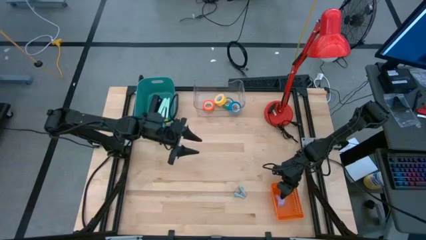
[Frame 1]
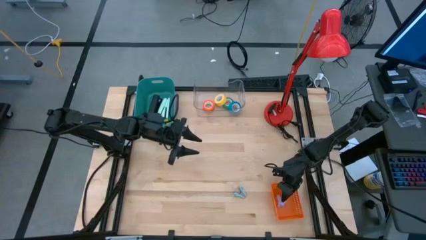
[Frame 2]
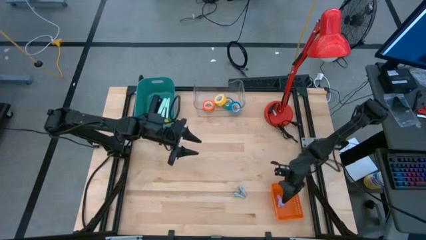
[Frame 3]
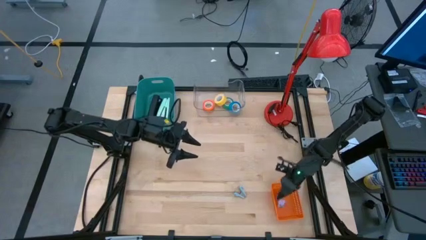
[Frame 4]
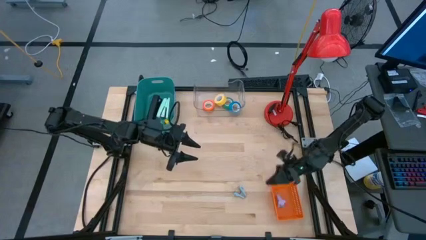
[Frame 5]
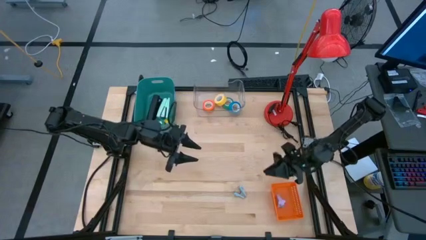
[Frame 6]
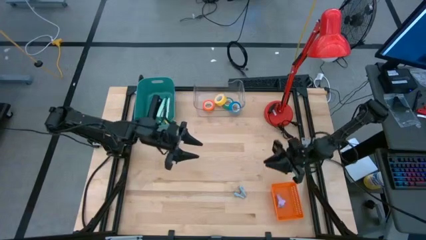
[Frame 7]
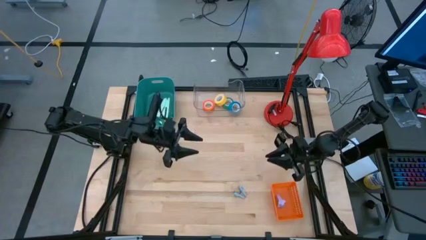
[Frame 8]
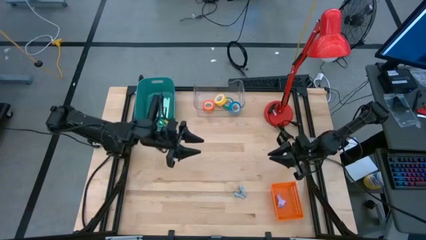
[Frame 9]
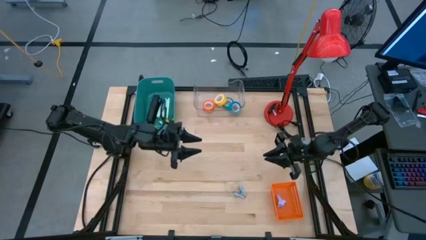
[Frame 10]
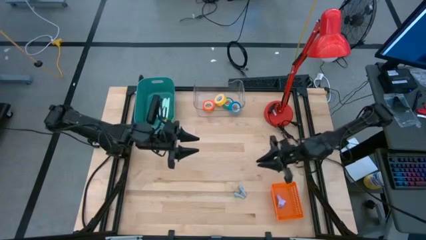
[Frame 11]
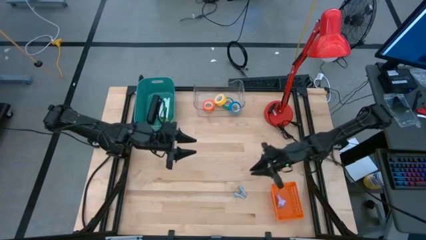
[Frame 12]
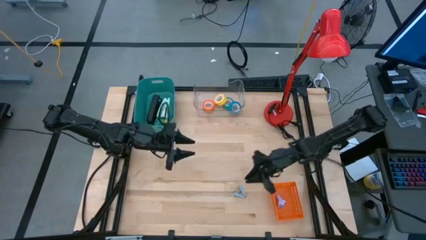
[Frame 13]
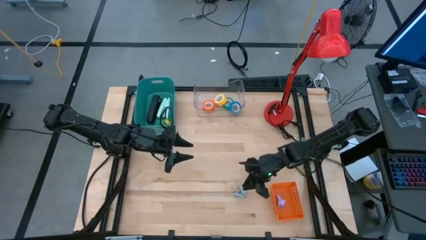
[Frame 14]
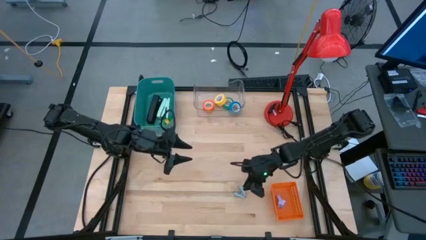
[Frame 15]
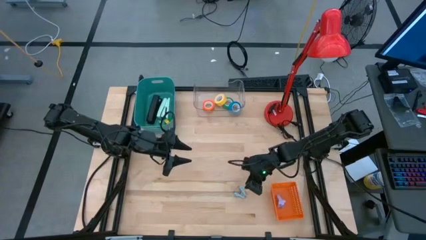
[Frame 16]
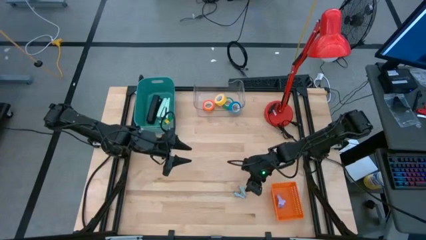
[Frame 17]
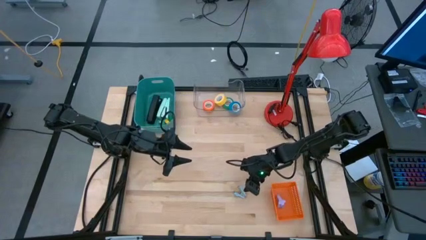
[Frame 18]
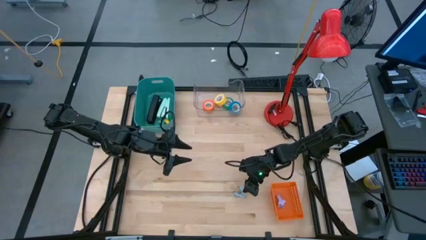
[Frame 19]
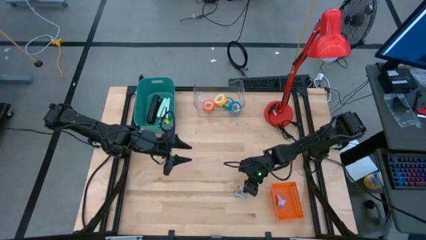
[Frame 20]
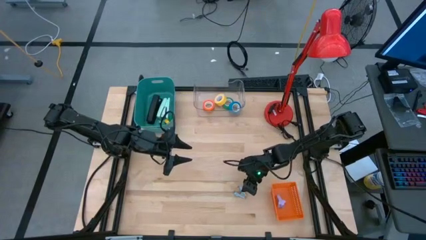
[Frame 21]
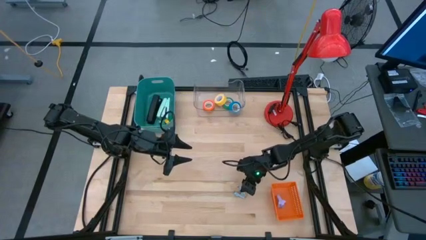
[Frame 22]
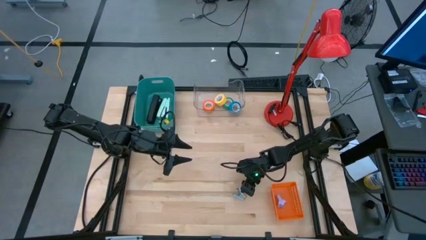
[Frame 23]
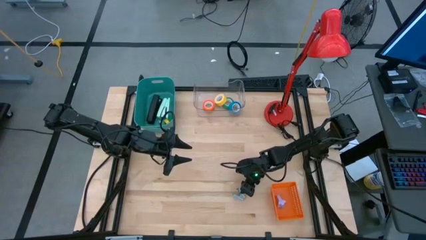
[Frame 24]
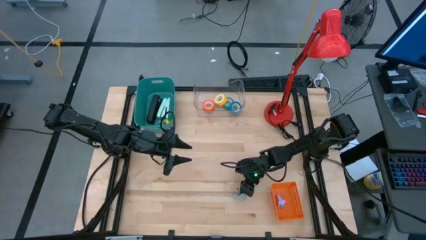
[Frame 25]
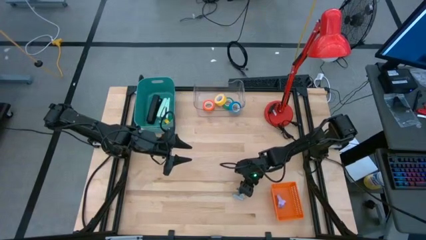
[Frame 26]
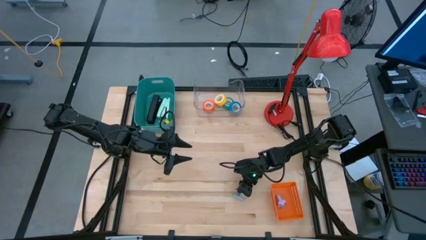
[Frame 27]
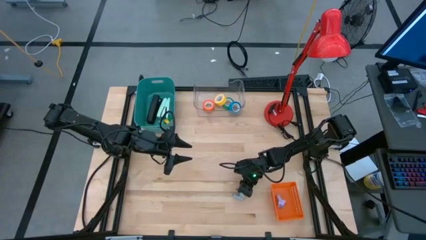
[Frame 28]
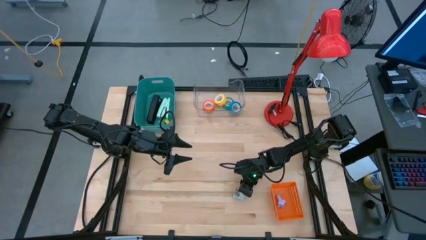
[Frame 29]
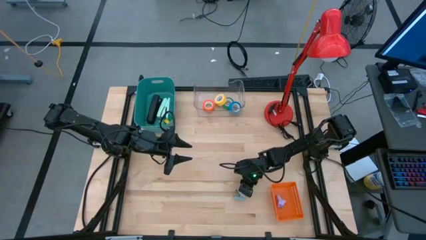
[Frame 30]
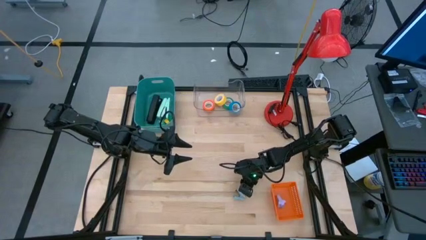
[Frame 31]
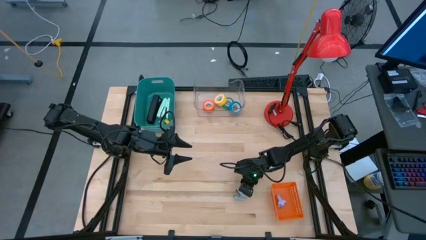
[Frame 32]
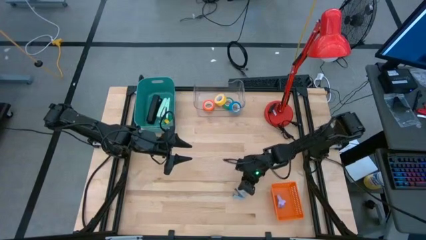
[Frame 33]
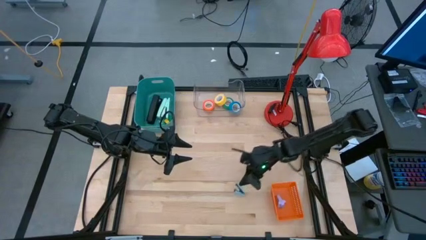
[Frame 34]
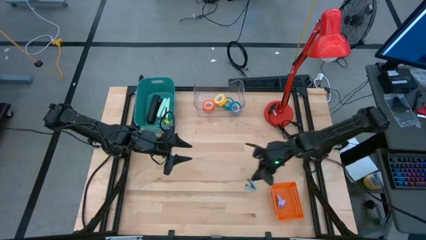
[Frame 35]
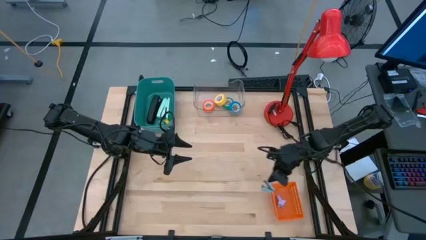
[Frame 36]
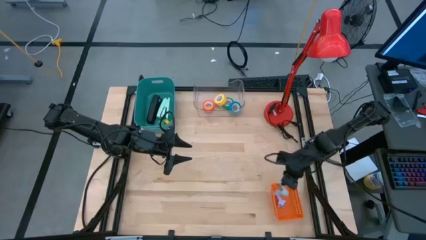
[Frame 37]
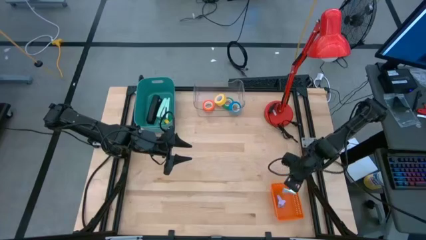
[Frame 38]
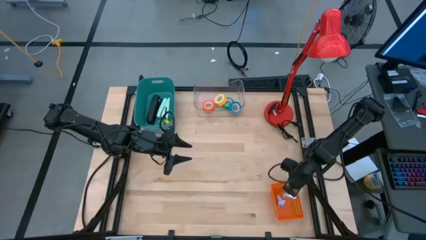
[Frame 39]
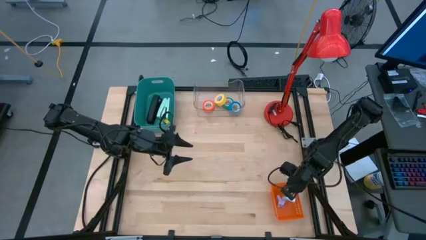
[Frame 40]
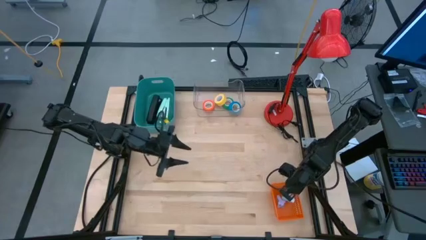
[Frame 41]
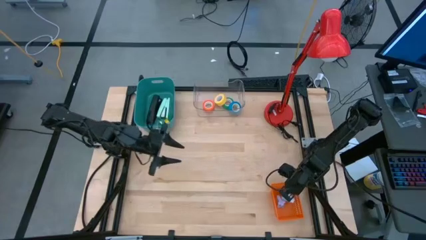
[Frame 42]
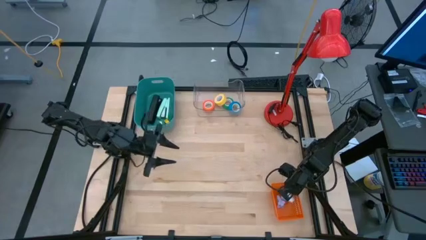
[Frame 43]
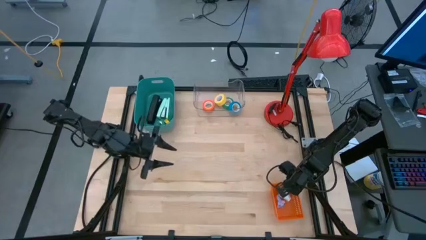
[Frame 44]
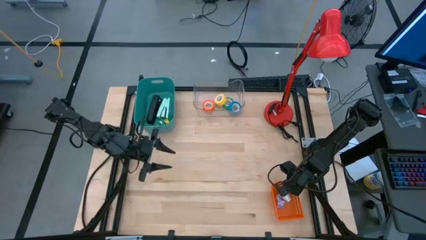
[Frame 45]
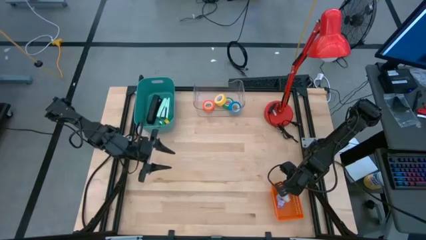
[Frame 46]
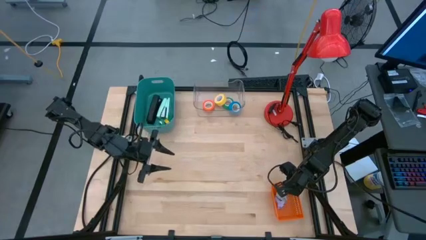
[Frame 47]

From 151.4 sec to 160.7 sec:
Task: Pick and place Stapler, Stapler remover, tape
Put the gray staple remover into the orange bin

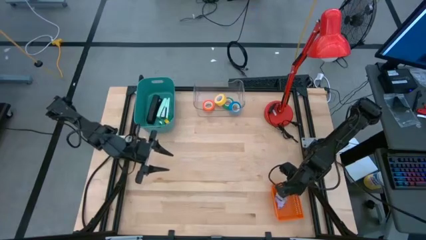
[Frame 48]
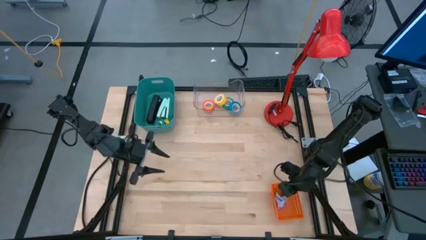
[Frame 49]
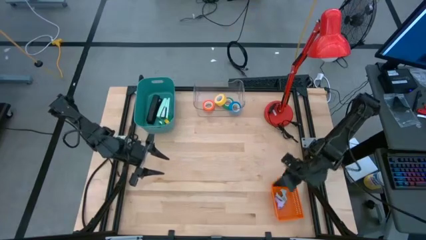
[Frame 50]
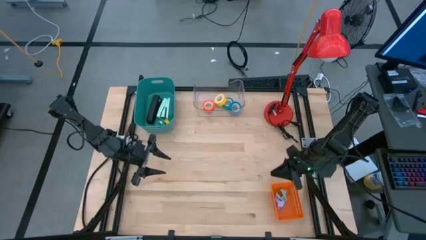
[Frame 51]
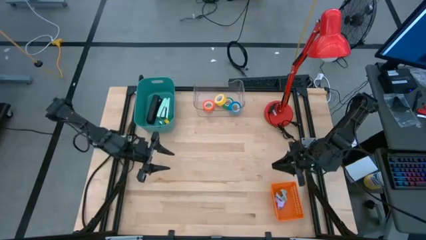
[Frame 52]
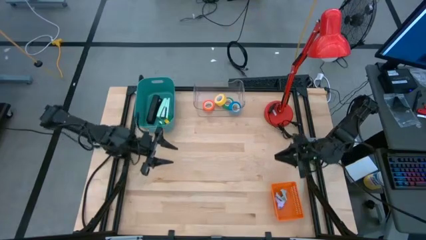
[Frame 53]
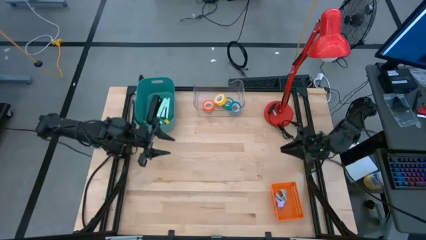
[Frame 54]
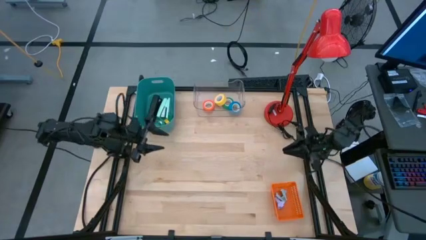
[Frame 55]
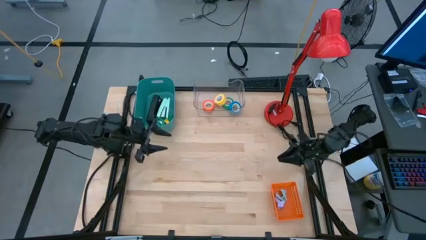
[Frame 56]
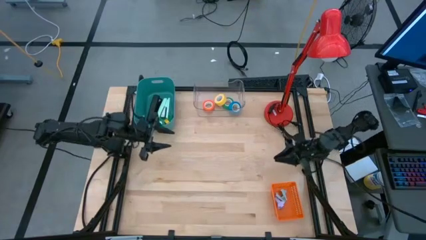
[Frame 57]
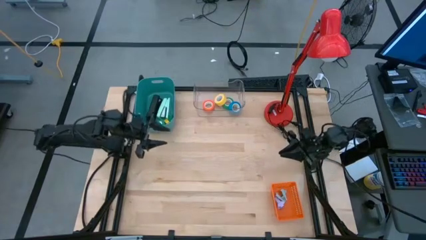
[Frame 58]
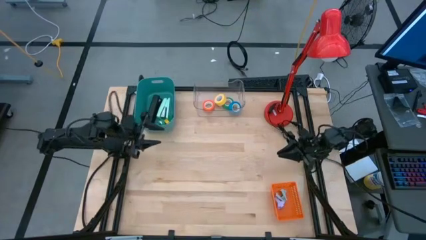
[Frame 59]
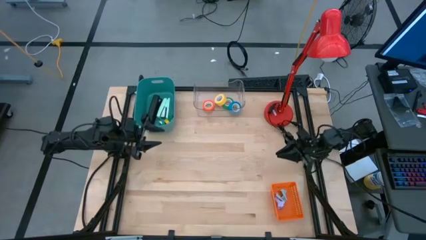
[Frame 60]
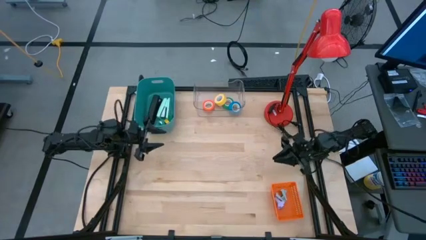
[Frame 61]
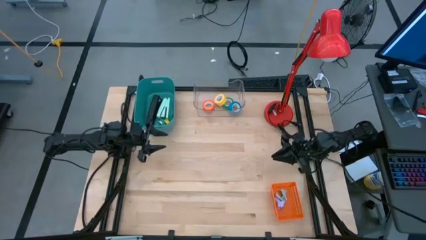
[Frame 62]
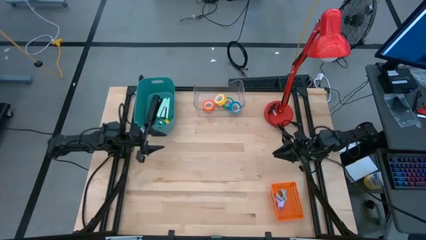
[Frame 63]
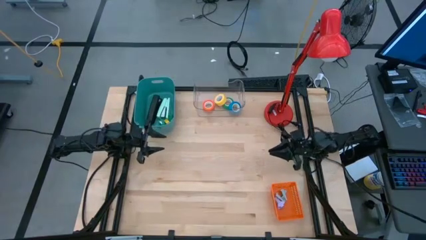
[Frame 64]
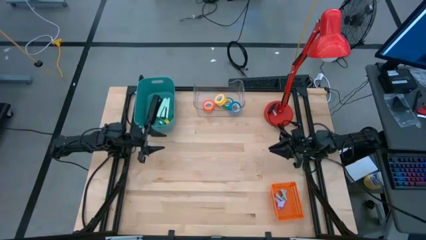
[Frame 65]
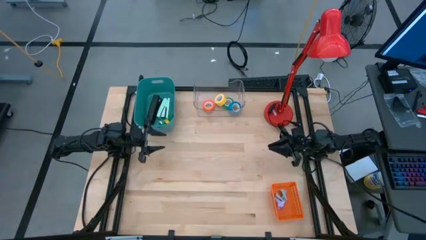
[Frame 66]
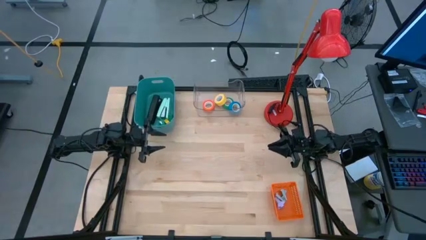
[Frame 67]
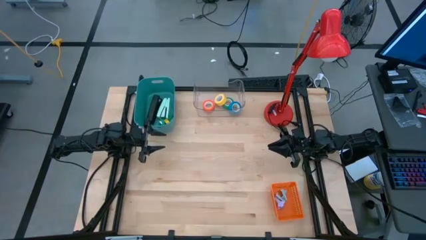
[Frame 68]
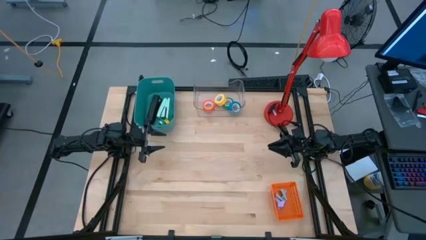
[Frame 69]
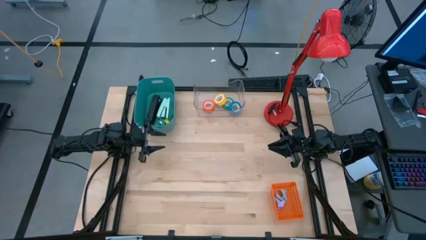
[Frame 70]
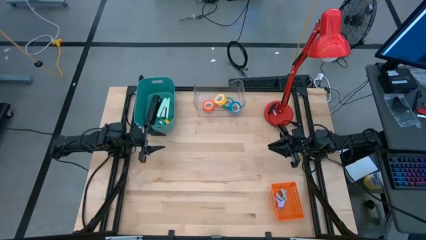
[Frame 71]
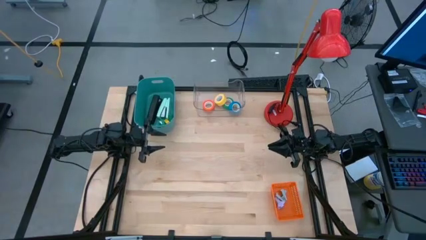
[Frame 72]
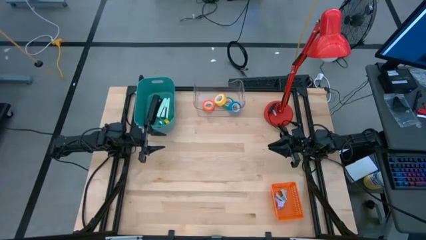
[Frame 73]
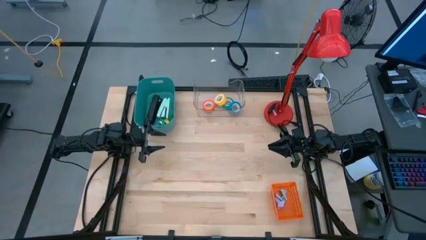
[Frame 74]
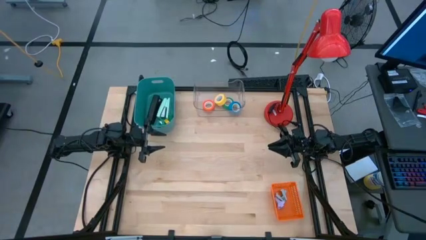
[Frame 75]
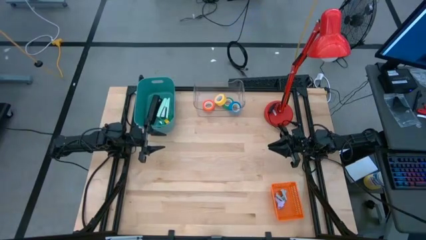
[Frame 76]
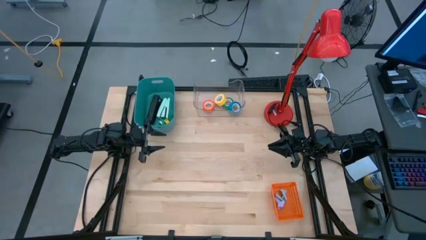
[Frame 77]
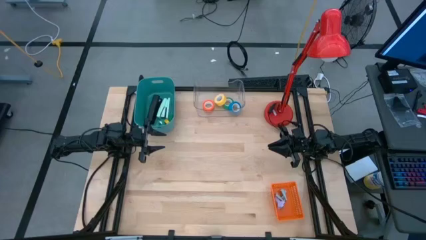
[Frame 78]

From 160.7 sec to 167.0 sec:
Return to Home Position

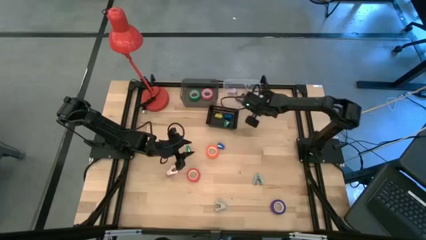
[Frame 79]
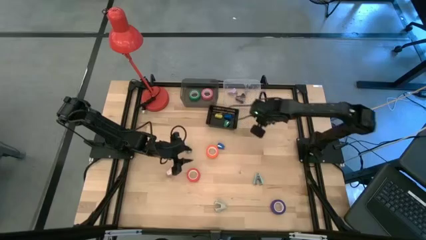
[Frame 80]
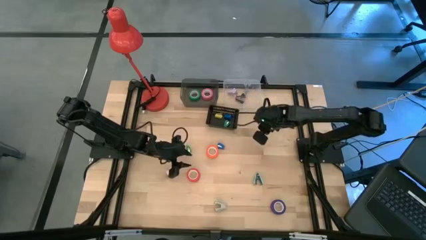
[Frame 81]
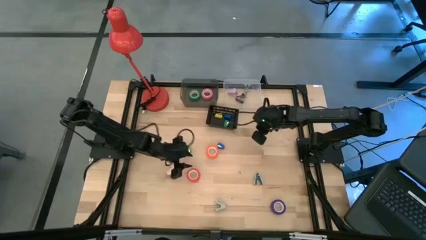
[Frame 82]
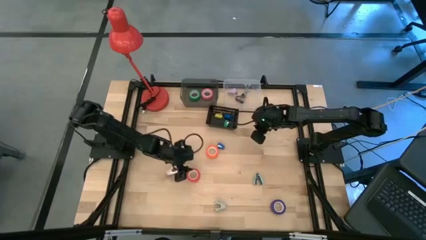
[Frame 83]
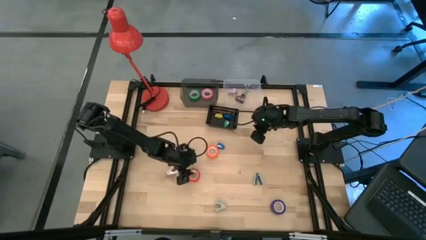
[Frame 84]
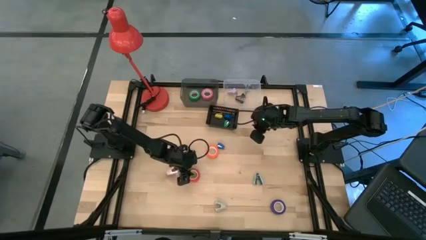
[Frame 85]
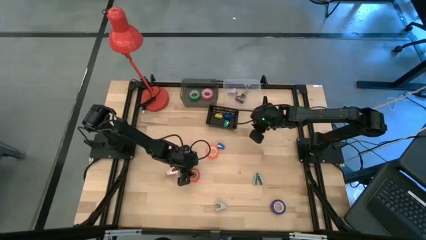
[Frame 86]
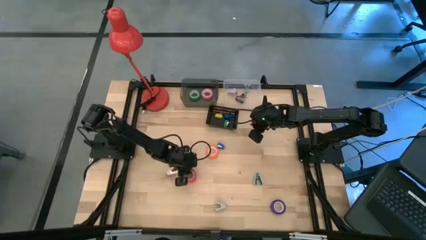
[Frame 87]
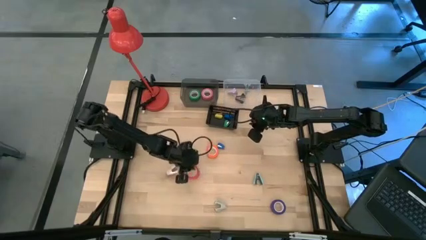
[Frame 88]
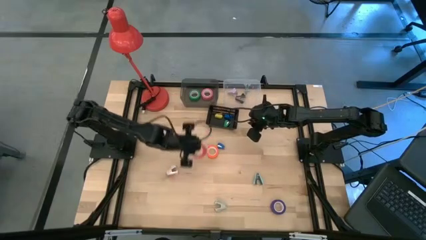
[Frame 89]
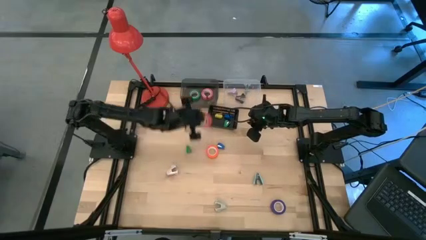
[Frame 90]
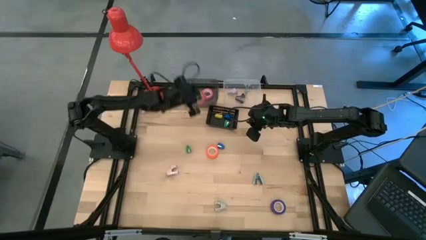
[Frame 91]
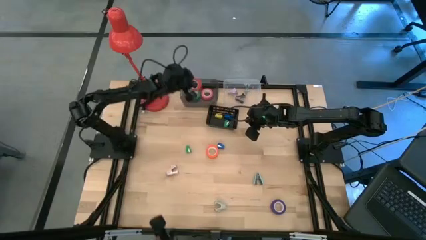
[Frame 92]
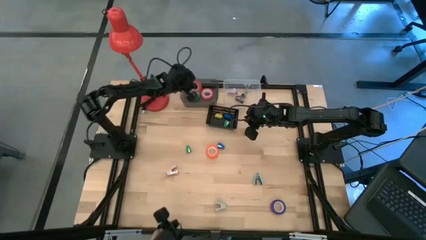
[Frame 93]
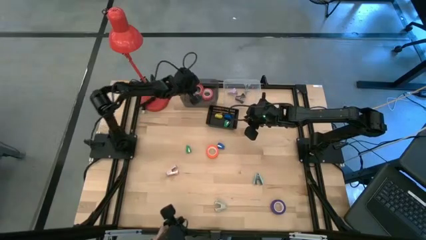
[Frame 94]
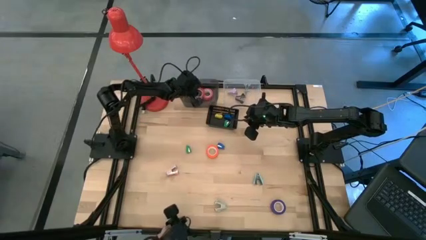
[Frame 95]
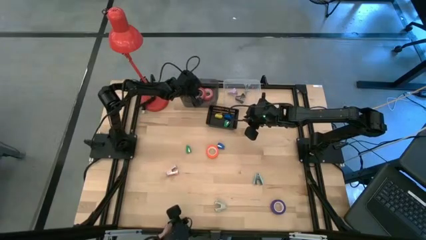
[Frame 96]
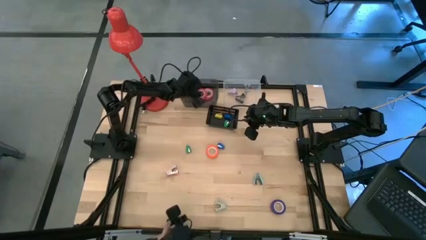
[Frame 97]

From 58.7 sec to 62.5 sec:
Task: Pick and place Stapler, Stapler remover, tape
Put the red tape into the black transparent bin
